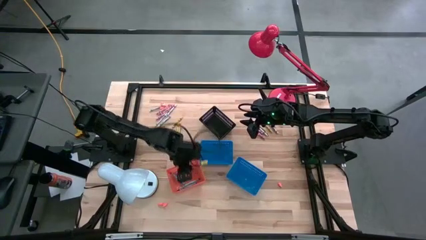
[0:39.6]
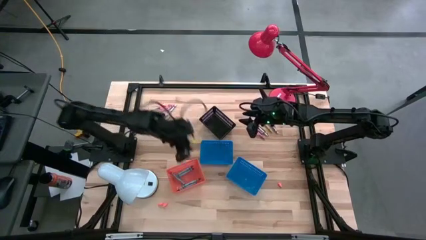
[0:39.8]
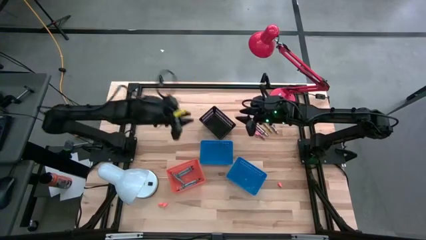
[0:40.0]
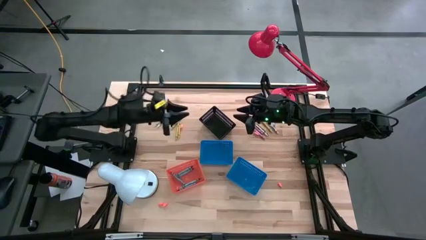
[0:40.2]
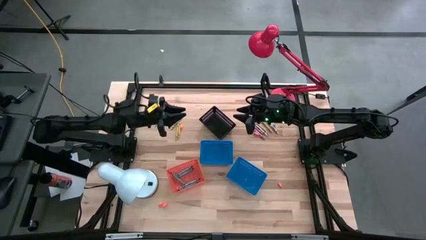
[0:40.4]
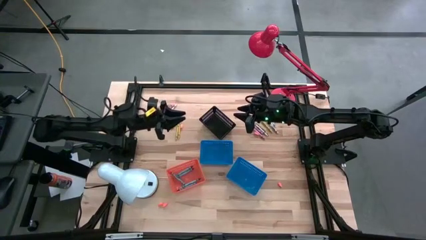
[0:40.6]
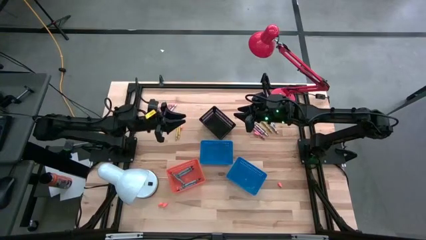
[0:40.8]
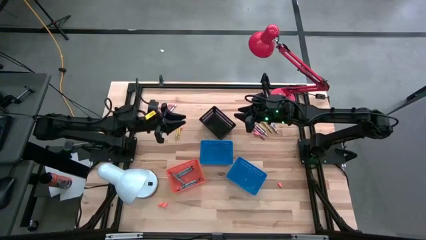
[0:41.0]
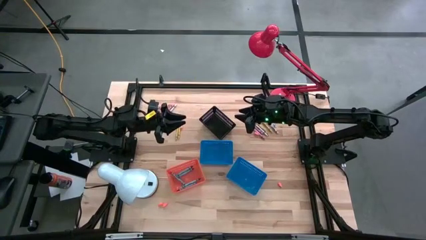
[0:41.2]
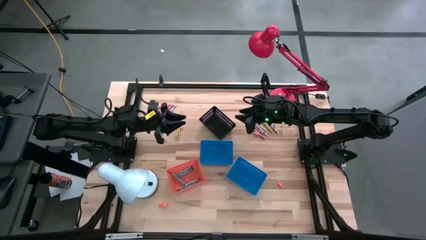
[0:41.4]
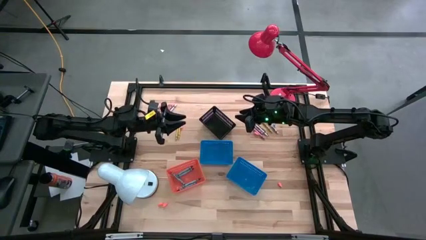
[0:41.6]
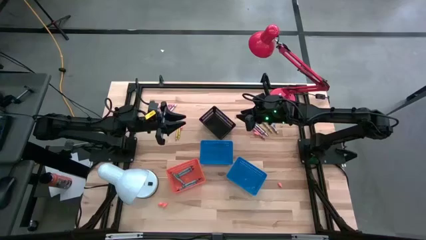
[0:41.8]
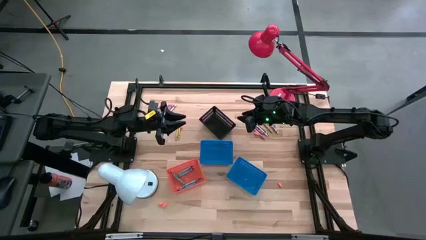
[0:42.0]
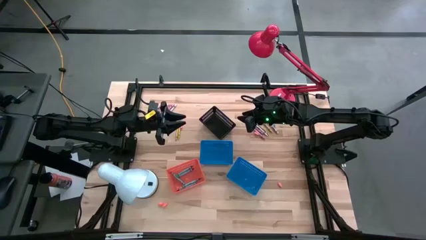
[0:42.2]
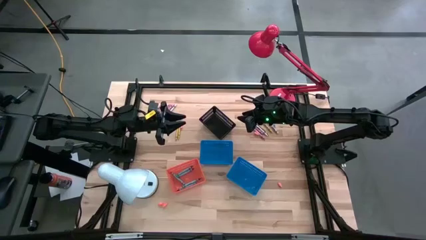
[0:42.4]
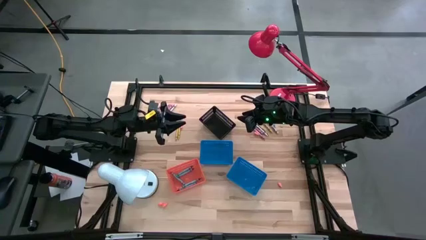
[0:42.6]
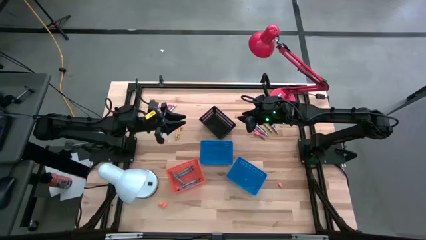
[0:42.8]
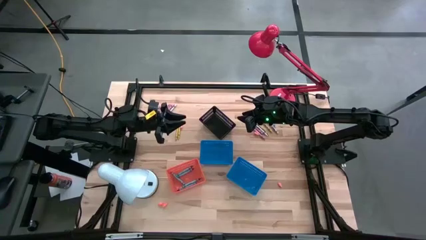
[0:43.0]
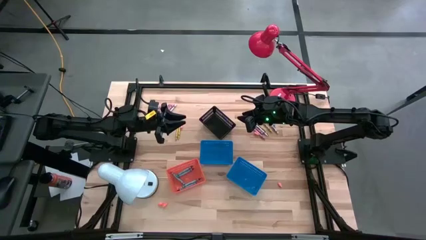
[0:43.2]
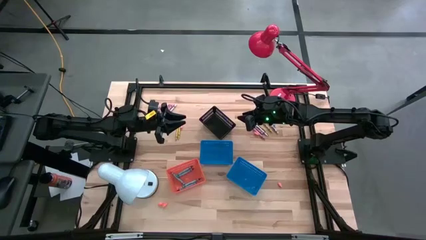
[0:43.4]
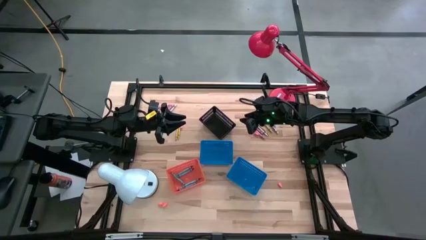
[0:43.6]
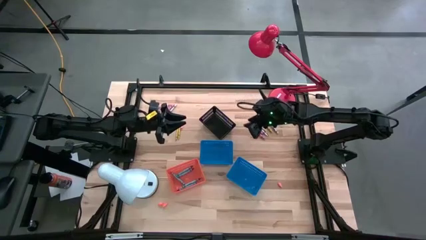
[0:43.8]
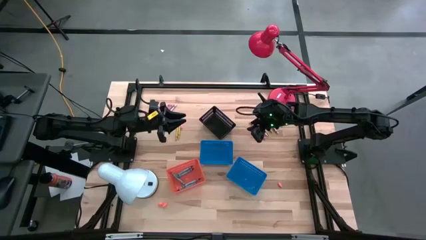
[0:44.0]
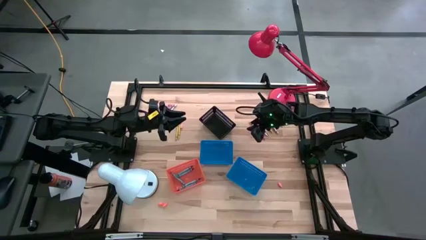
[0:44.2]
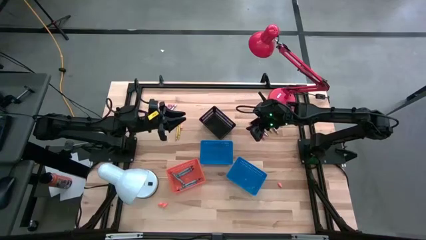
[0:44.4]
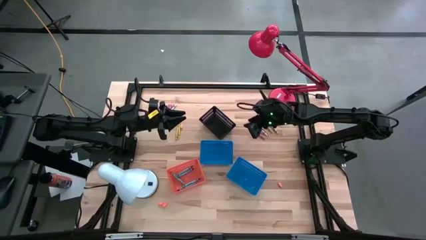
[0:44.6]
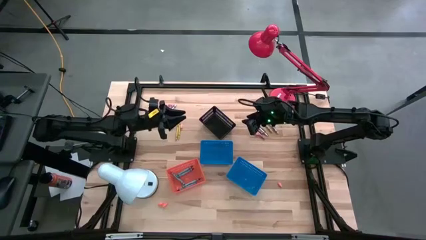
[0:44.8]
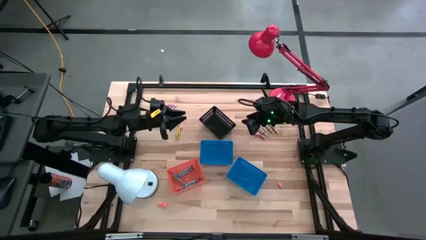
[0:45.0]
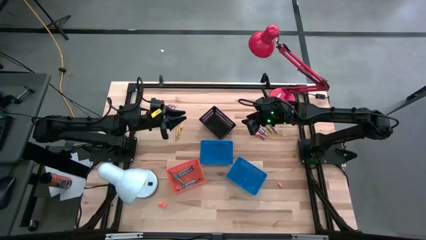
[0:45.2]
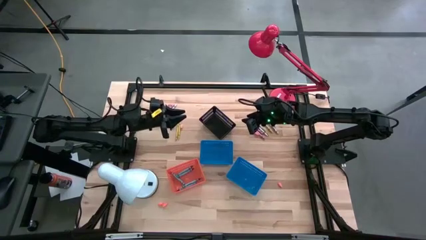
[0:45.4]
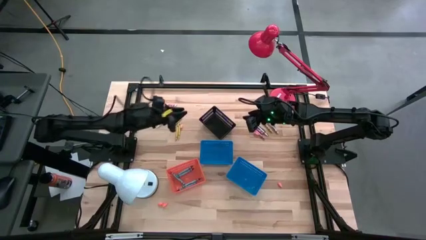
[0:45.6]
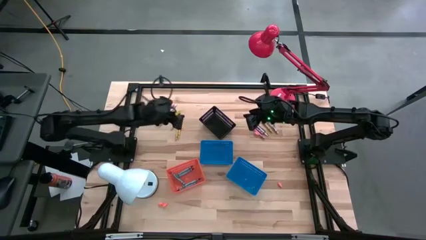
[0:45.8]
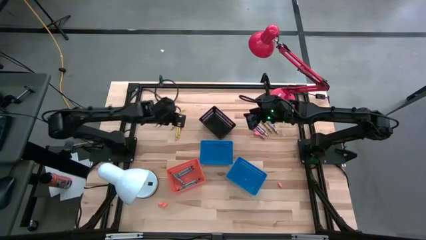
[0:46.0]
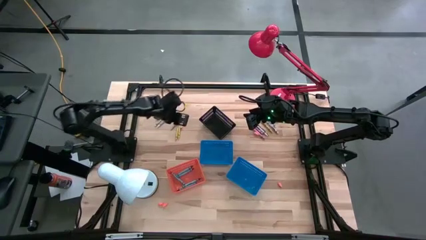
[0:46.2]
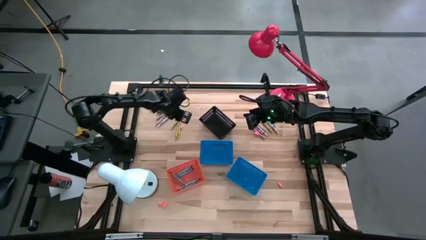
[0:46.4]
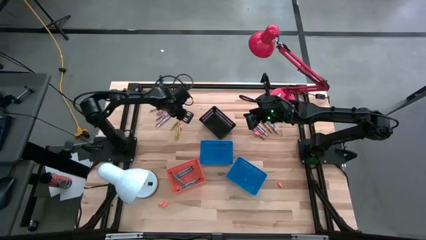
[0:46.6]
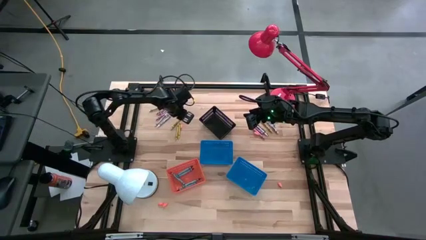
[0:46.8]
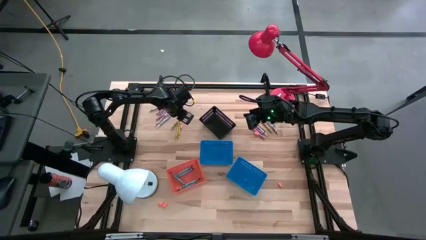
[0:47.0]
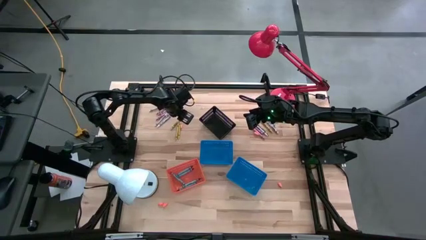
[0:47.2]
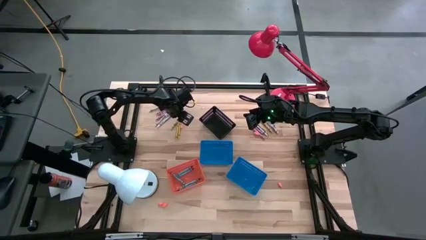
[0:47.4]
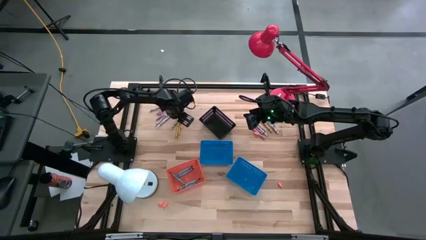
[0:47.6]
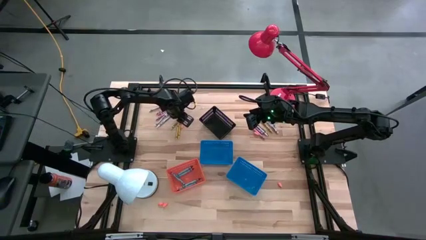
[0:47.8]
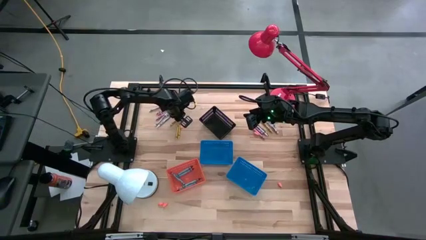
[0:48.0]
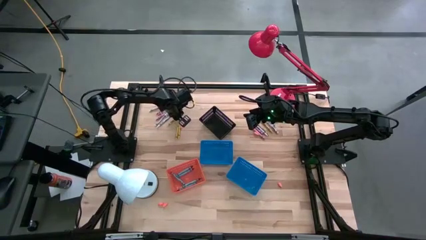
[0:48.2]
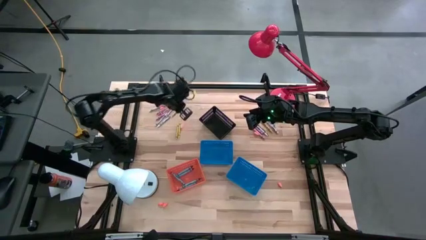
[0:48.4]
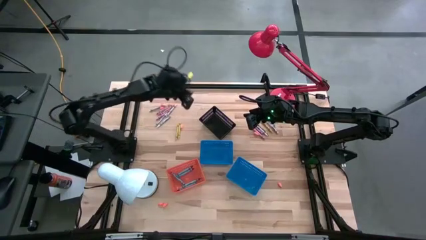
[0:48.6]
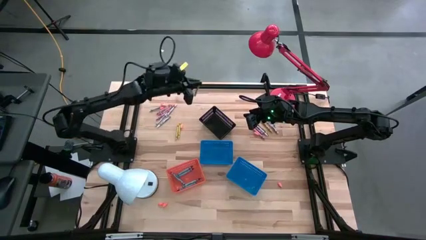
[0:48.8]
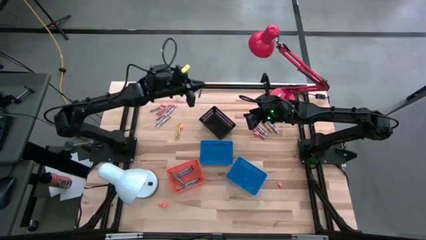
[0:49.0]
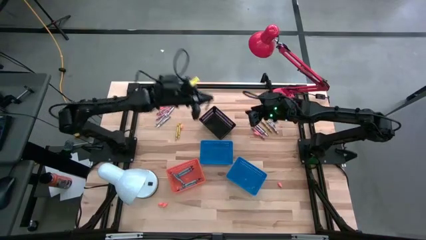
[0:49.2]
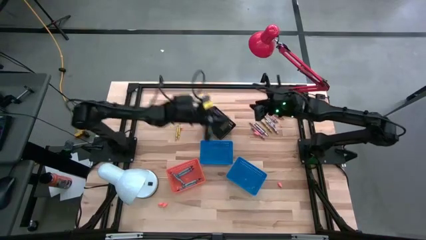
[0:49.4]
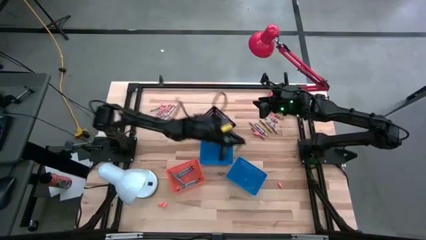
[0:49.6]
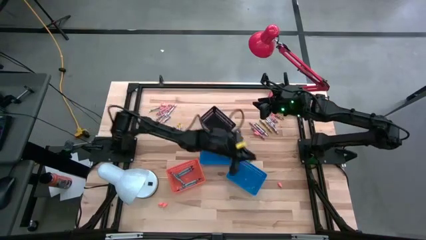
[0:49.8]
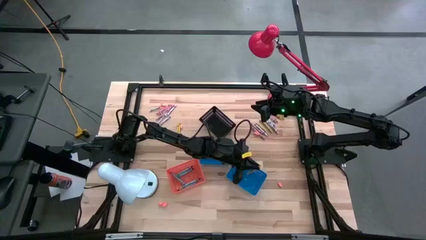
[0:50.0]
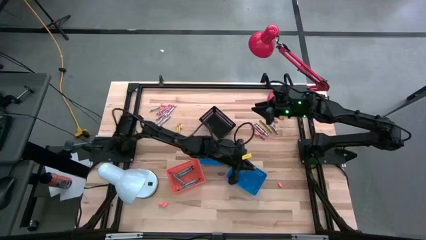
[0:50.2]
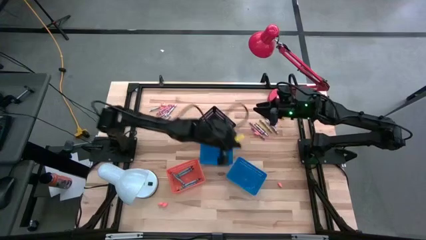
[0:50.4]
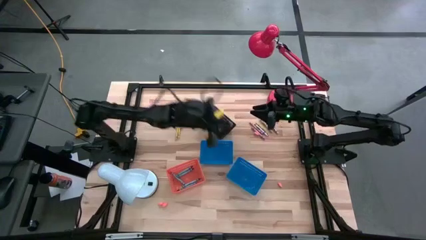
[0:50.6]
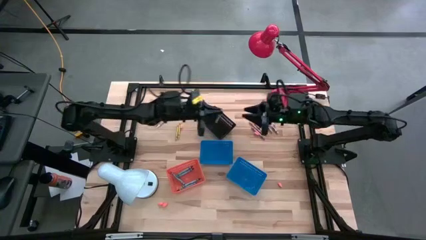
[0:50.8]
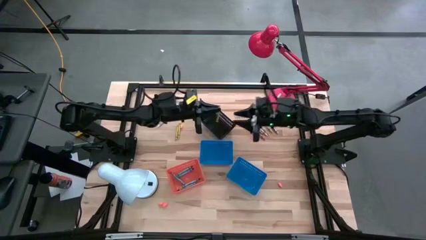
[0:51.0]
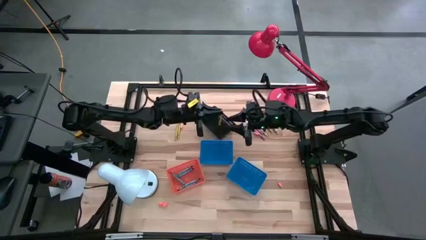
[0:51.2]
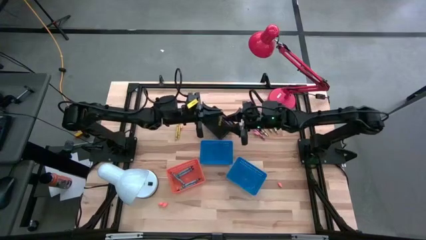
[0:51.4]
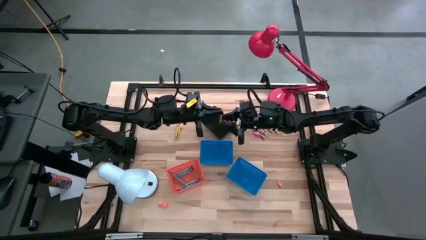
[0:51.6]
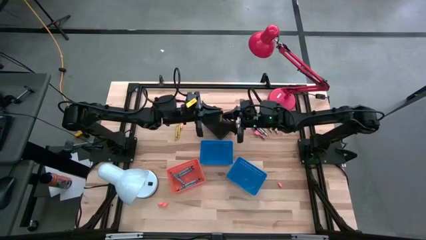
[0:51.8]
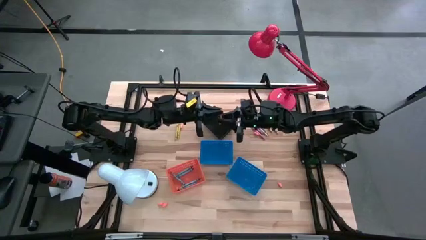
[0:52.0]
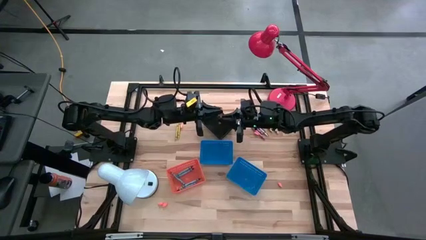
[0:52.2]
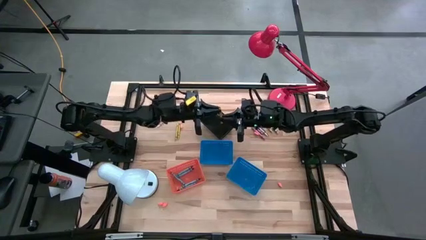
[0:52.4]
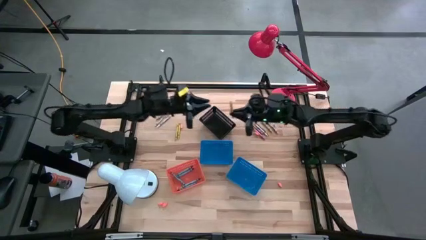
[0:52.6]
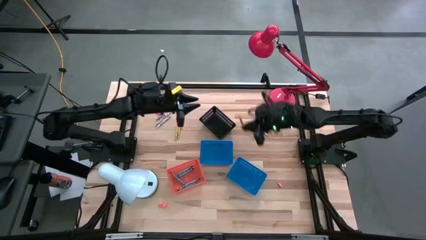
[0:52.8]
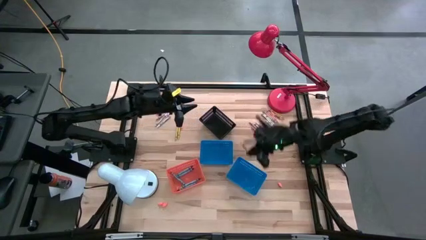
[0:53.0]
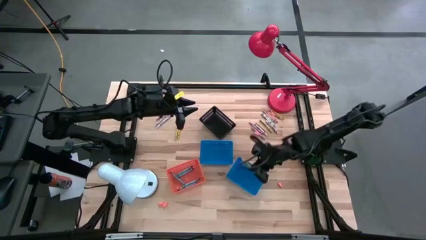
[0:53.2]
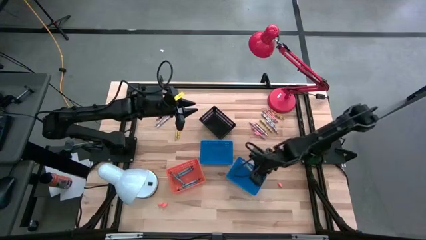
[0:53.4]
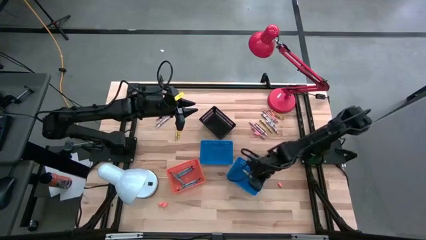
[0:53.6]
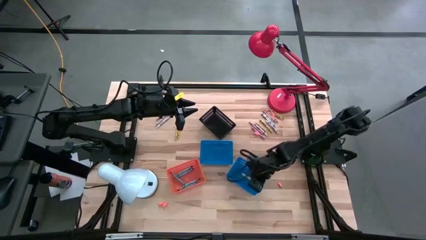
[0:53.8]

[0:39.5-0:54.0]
Task: Sort crayons
Put the yellow crayon into the right blue bin

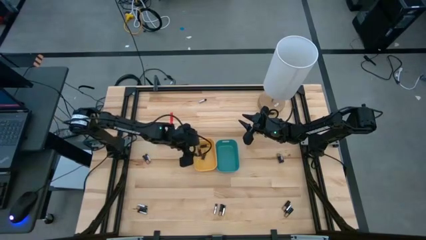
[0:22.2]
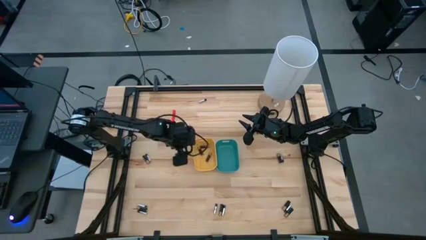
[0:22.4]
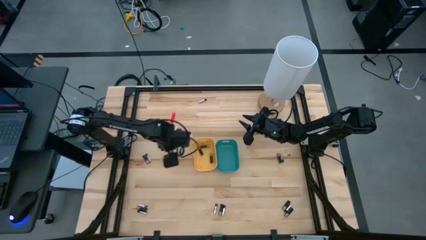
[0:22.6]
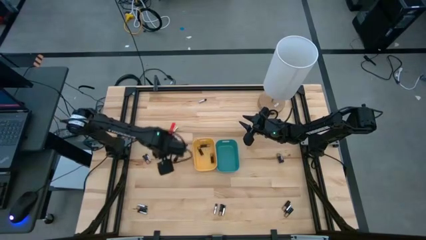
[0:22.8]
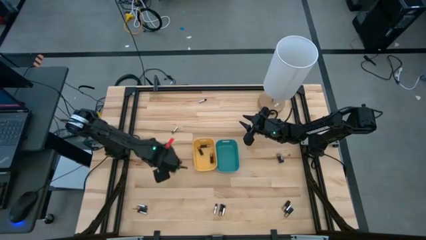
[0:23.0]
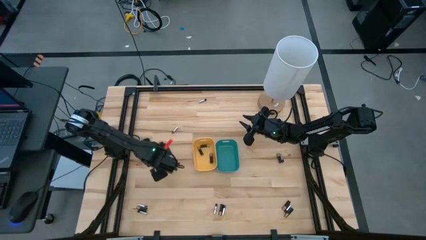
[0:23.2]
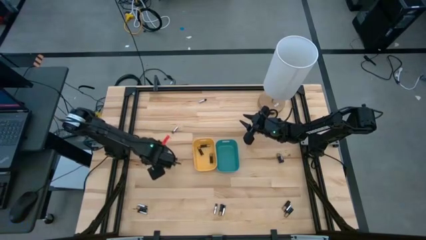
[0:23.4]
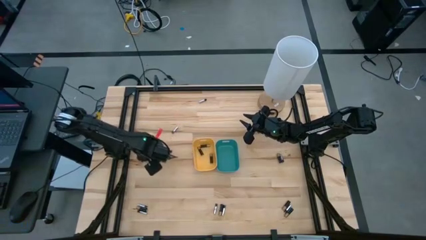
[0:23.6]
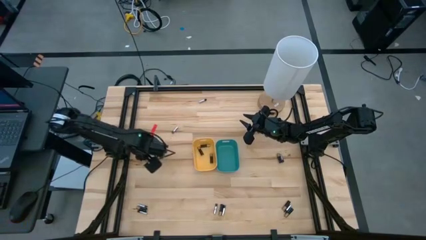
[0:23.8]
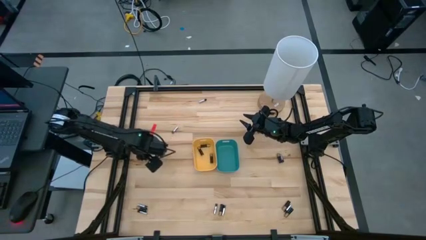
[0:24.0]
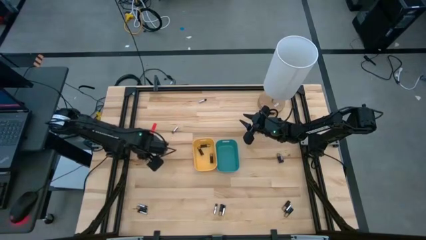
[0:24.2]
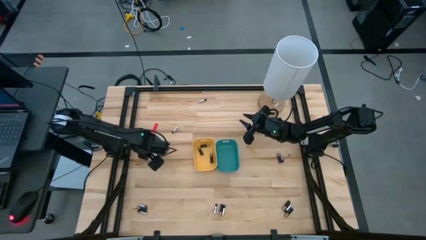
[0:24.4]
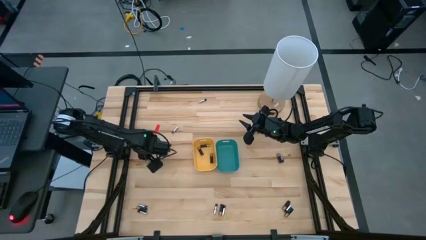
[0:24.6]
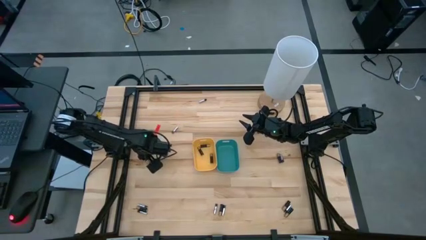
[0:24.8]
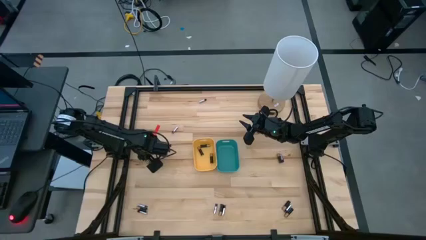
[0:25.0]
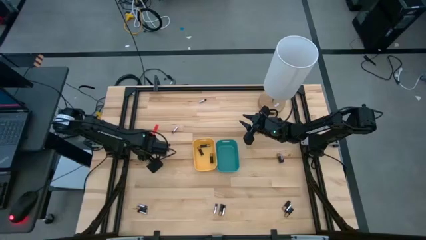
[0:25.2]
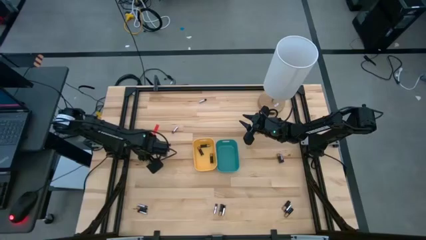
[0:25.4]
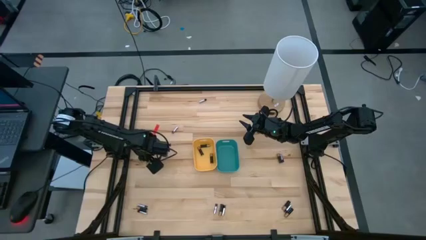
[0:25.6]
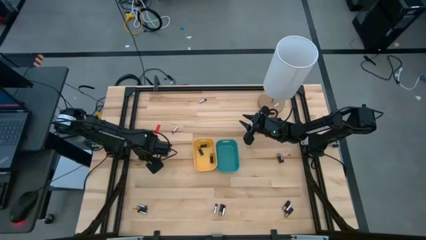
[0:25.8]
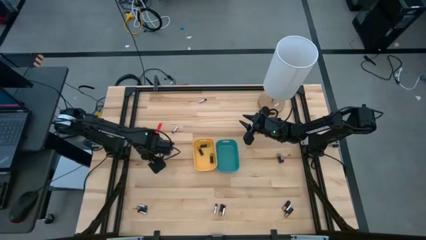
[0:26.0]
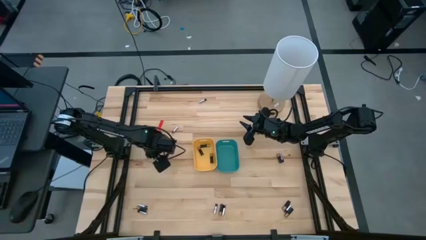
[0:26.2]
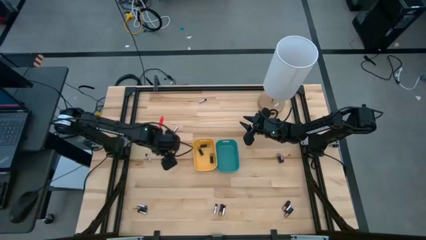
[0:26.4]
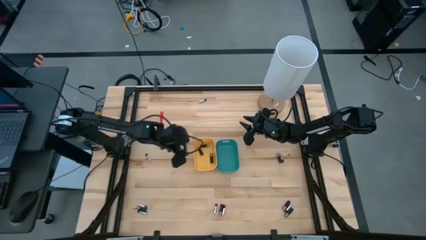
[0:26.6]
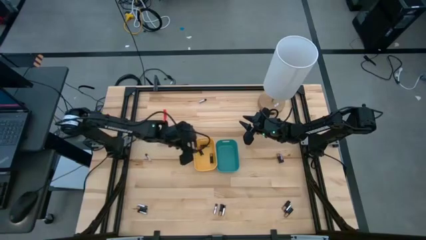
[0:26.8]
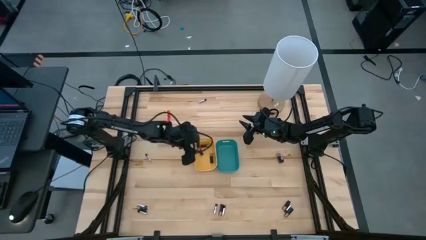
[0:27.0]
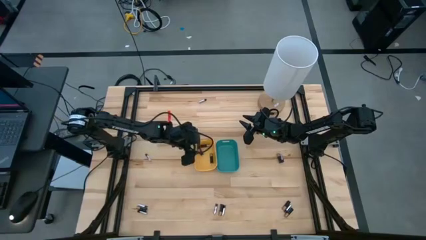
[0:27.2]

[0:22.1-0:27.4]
Task: Sort batteries
Put the black battery into the yellow bin
